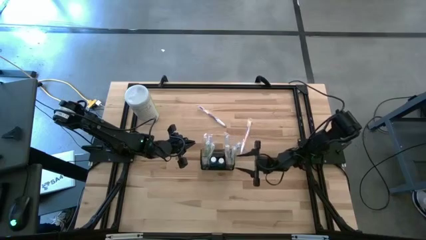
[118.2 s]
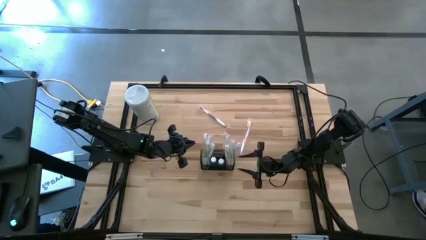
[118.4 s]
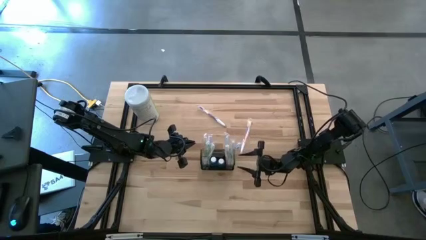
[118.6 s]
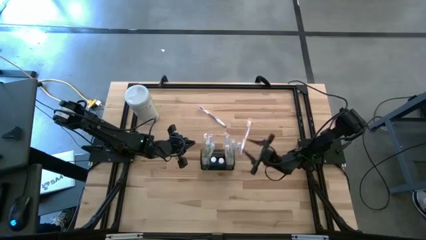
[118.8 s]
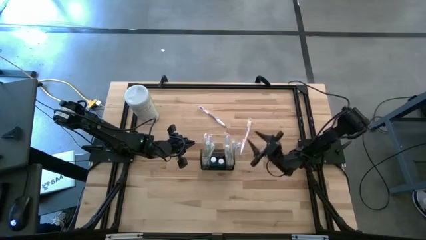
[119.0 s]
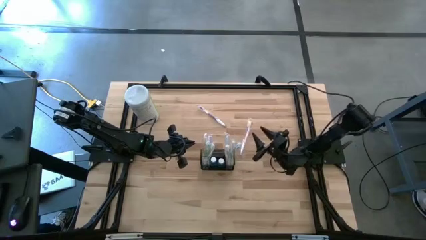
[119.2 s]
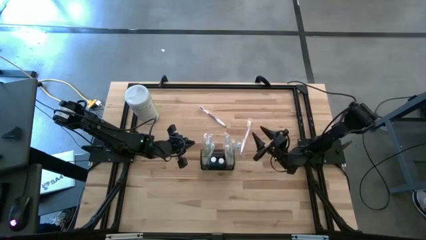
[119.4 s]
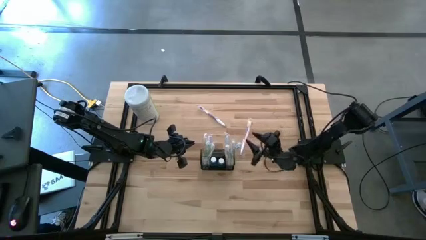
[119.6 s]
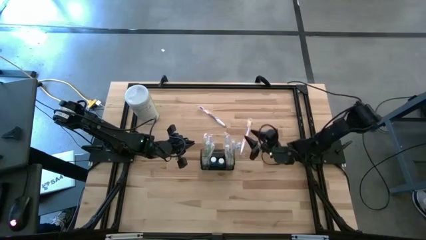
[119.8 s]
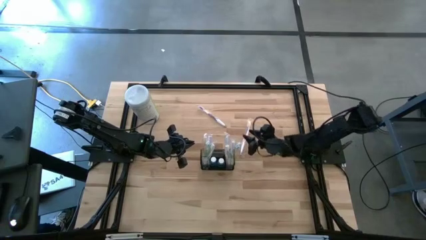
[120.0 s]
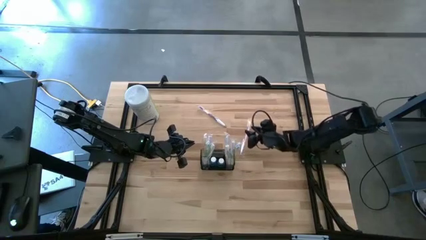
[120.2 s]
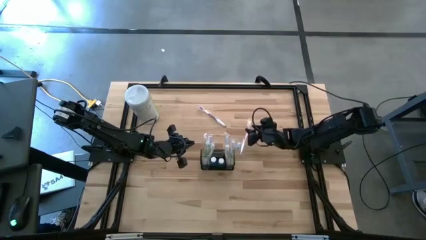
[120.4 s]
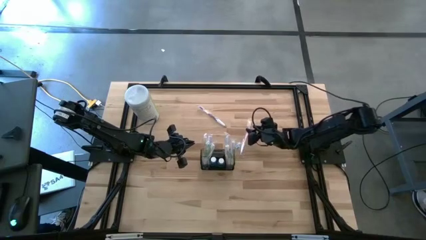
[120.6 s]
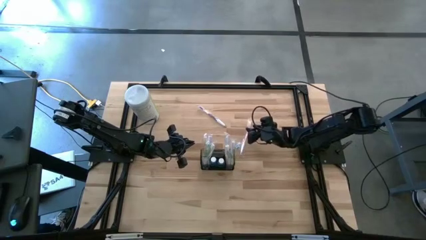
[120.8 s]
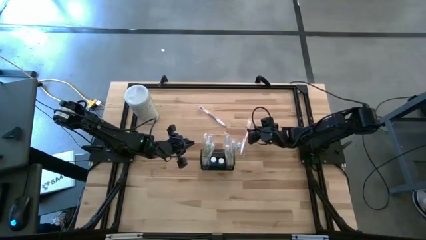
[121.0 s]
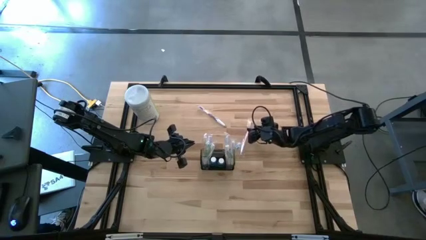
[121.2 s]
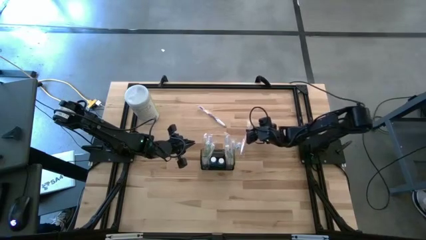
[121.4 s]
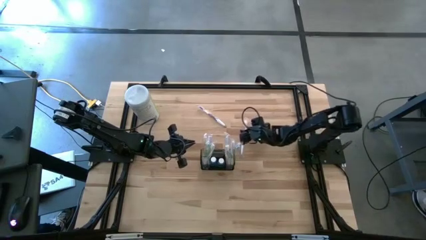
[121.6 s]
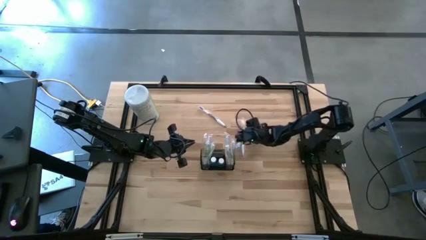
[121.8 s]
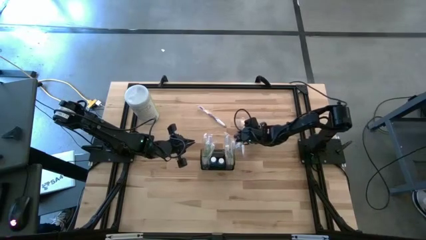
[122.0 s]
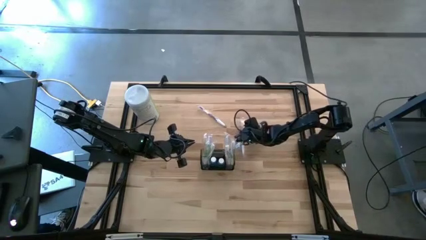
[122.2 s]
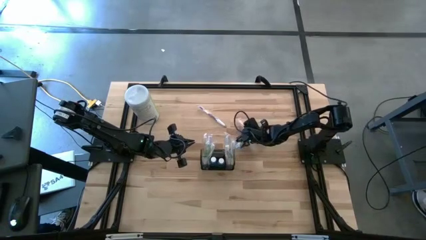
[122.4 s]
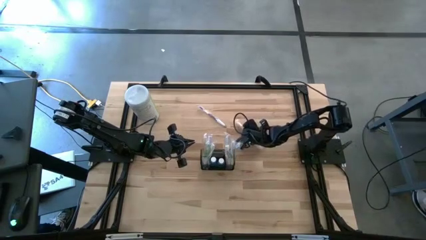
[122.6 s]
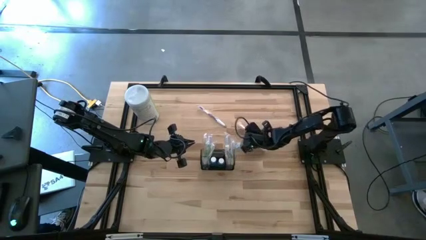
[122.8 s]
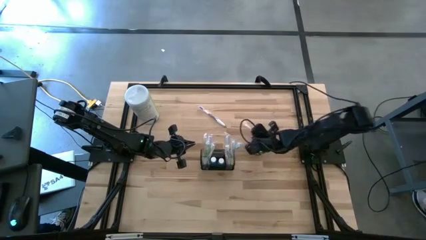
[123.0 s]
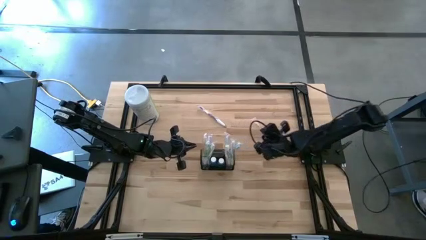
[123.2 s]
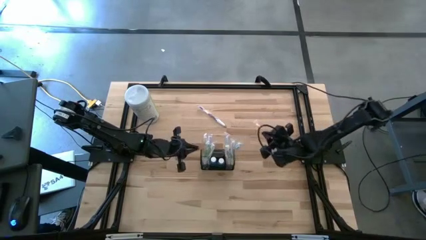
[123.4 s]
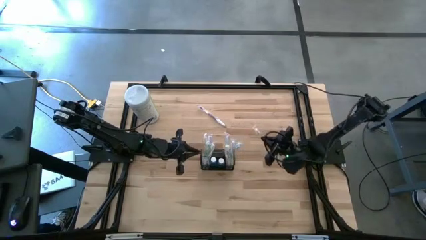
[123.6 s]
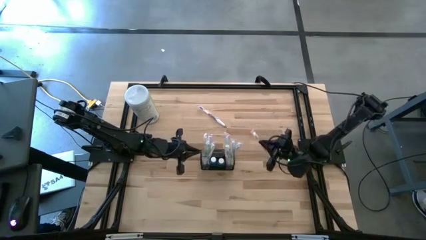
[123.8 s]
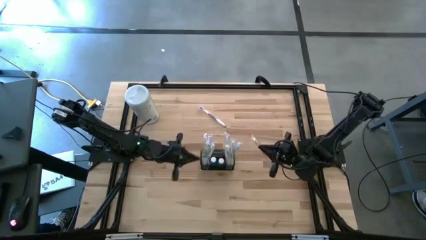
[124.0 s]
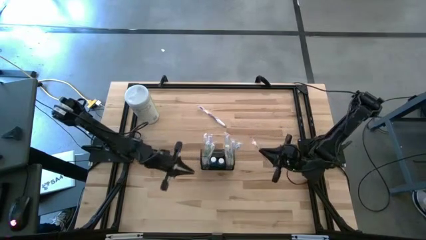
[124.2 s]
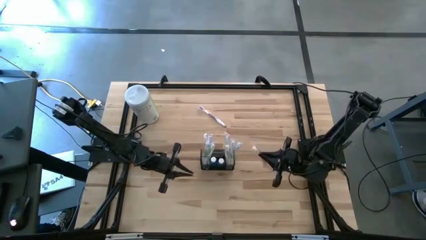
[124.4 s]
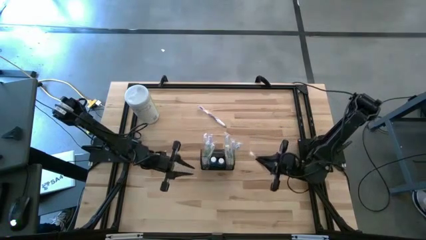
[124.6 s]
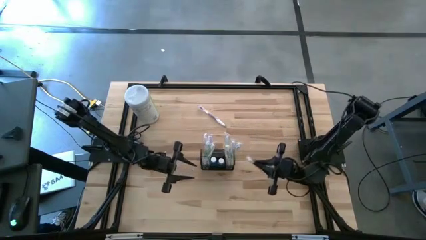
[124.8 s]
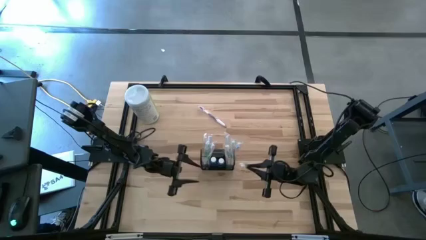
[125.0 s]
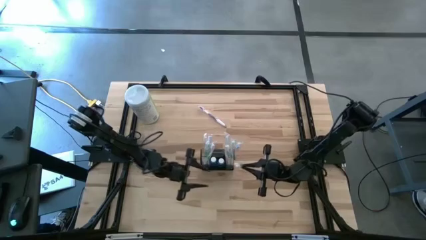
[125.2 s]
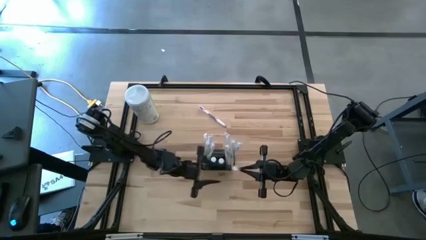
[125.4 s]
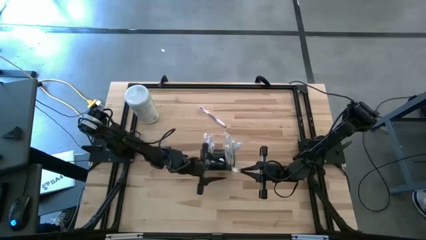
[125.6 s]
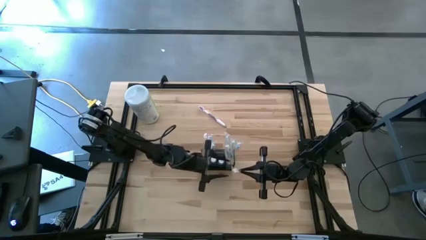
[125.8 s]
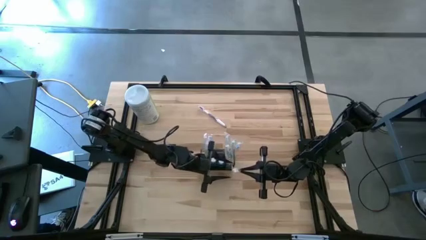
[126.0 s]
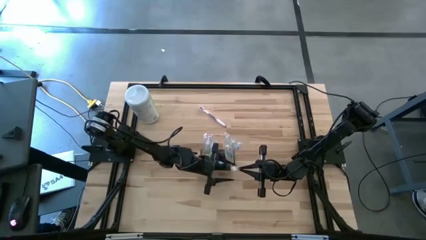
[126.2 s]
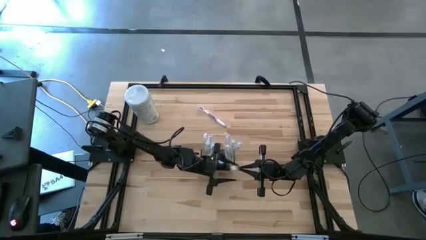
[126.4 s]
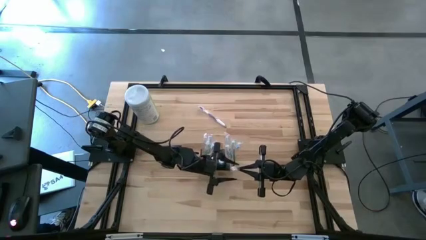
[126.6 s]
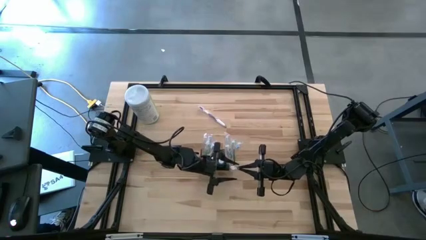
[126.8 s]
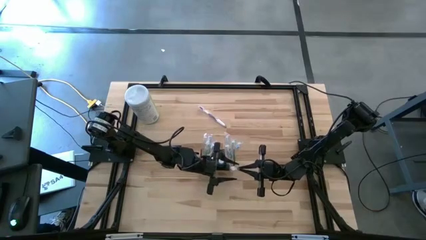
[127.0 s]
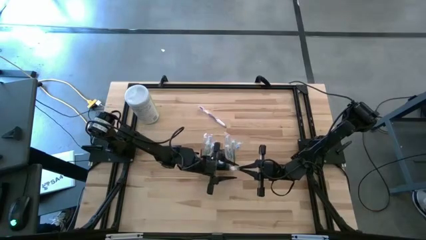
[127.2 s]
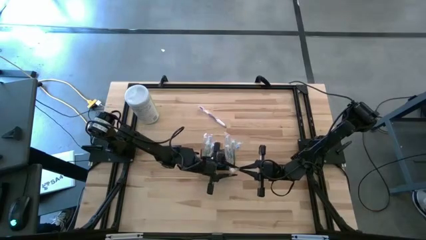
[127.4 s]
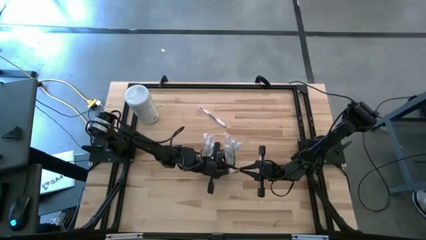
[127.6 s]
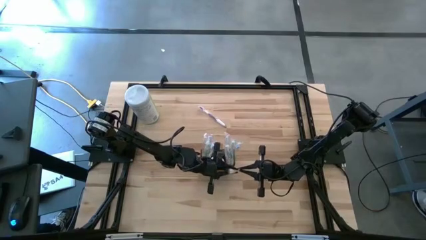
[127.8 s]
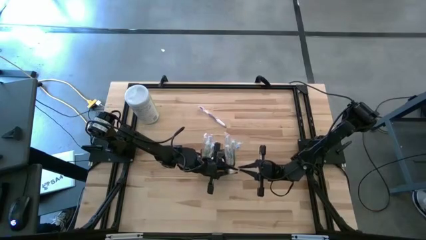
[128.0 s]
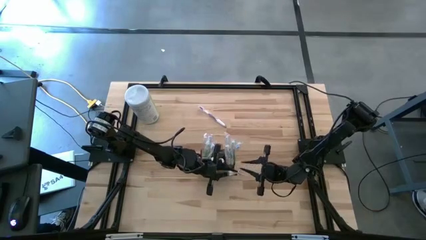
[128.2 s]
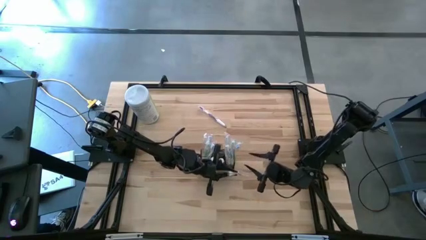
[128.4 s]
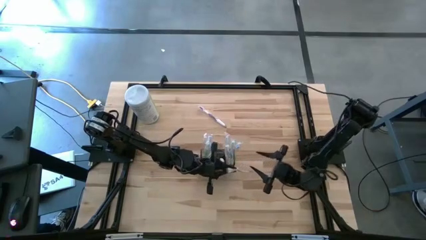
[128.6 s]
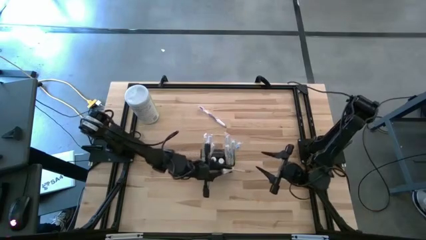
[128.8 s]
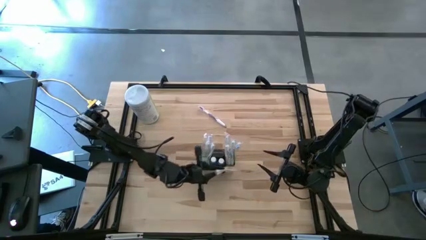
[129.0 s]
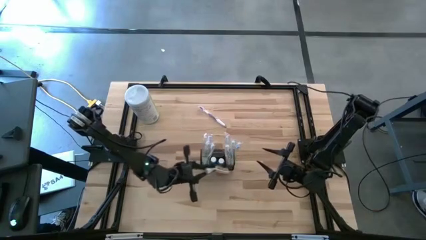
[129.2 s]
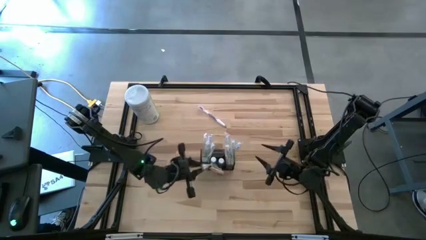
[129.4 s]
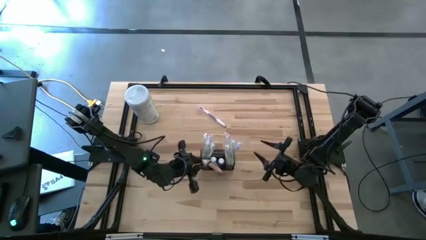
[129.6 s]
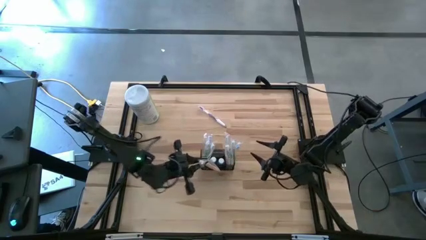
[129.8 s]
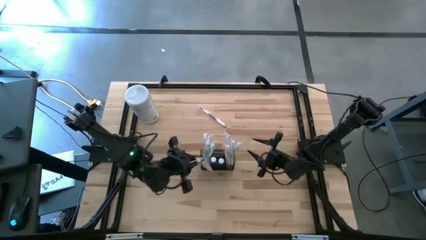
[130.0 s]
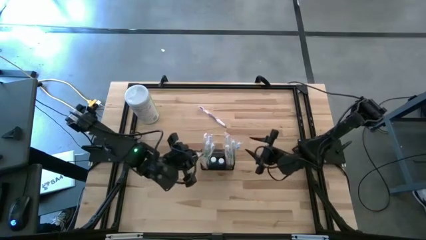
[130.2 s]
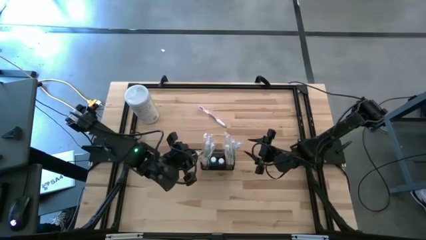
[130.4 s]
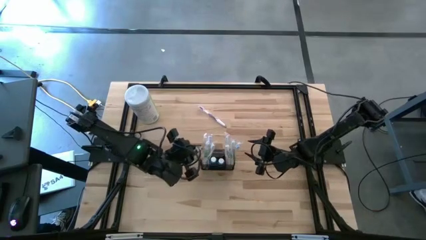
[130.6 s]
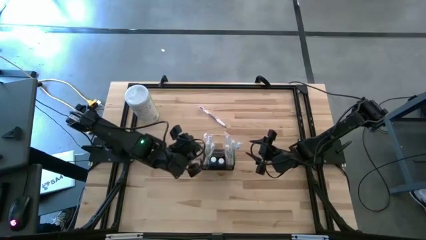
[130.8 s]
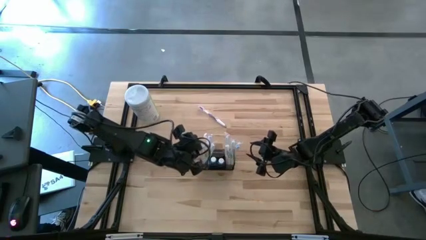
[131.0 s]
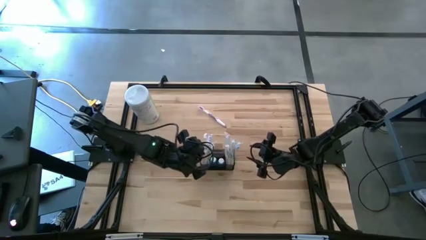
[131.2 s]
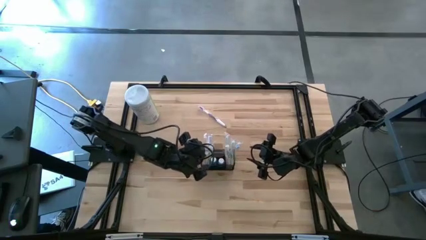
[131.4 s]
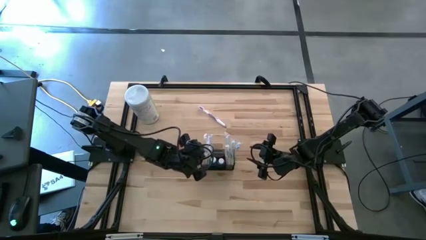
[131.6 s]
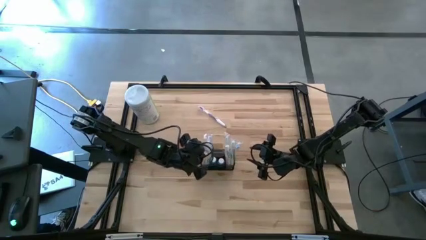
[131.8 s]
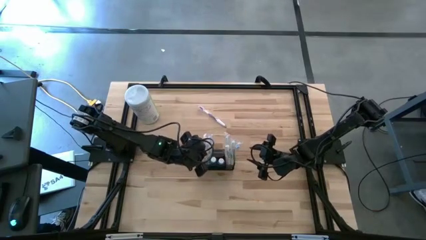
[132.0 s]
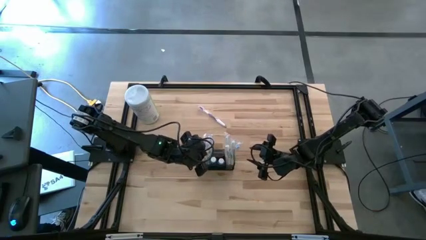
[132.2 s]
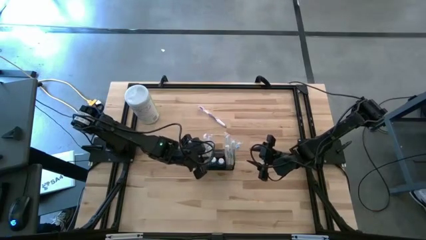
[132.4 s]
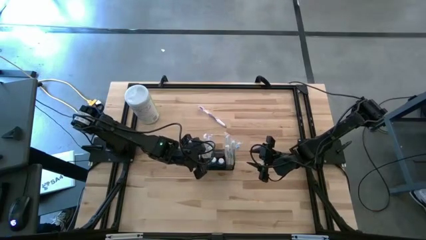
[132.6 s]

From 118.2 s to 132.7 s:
Task: Pick & Place toothbrushing station
Put the orange toothbrush into the black wire organizer

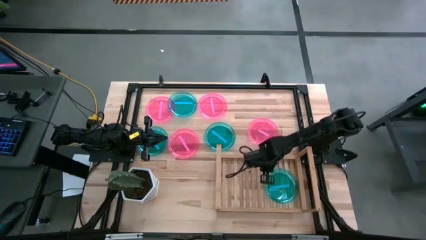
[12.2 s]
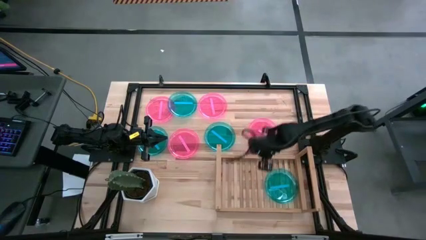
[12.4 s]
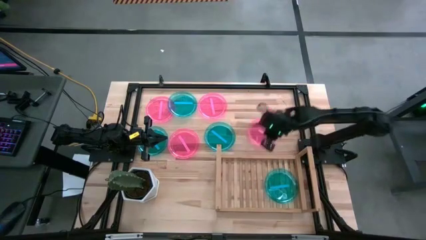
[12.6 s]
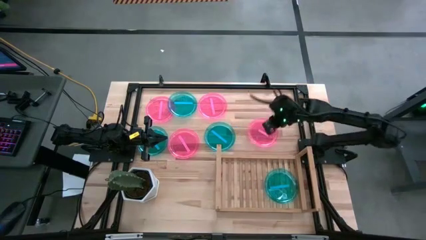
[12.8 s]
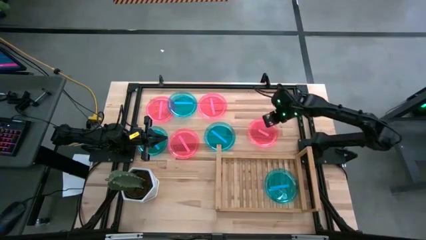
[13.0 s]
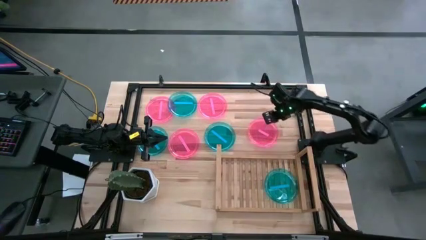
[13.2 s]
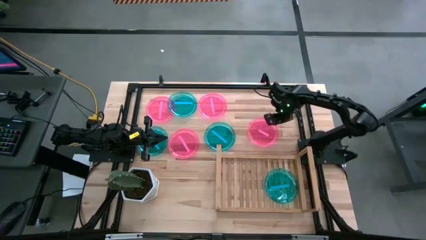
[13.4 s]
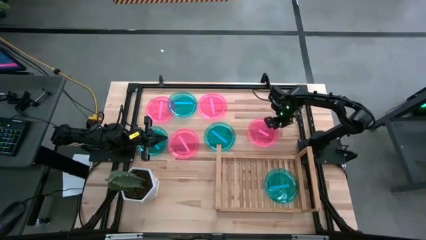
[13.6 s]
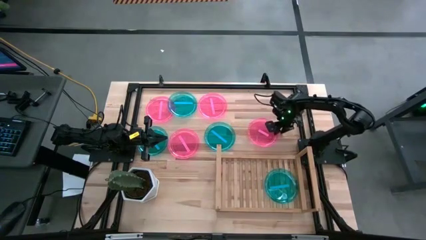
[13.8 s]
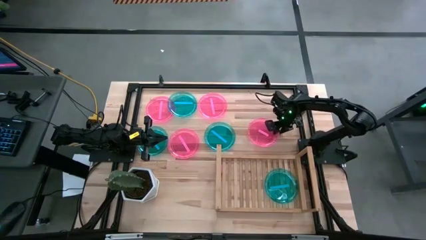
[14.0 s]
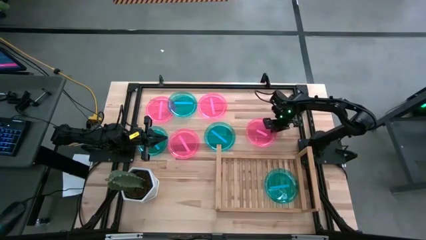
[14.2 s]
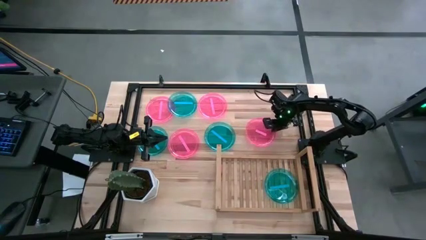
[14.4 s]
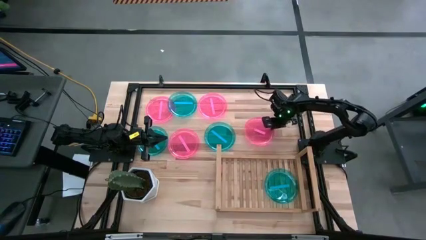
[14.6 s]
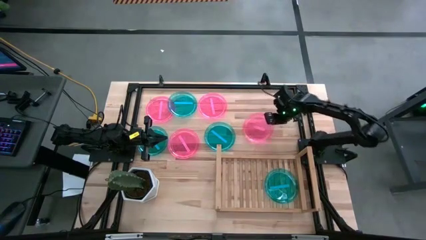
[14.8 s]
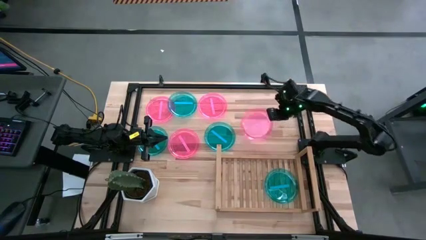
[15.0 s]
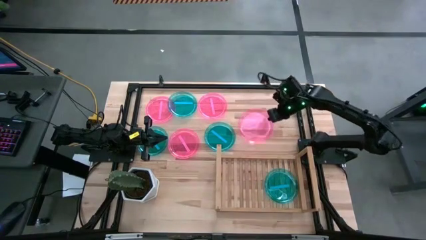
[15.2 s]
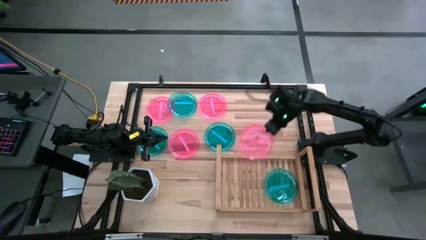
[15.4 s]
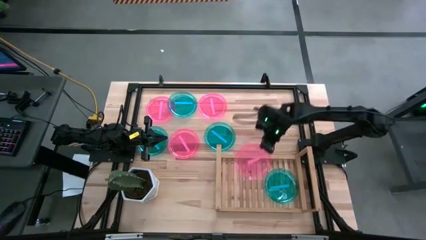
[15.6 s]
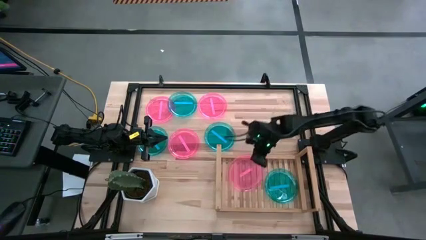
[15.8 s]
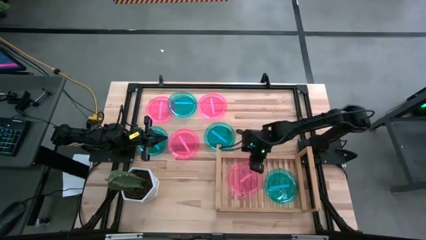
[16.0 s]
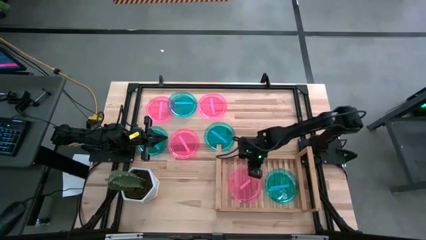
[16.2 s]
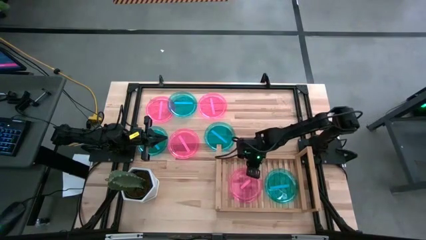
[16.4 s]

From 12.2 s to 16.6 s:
Task: Place and stack plates onto a shelf
Put the pink plate on the shelf
